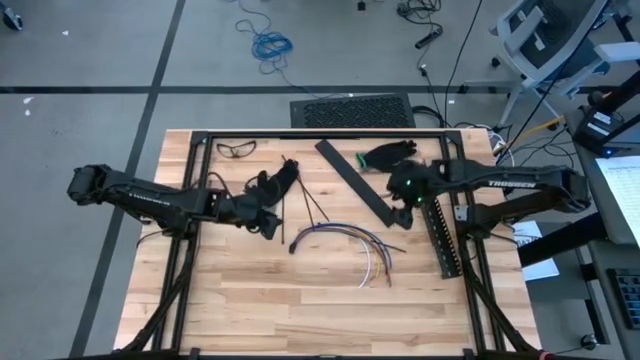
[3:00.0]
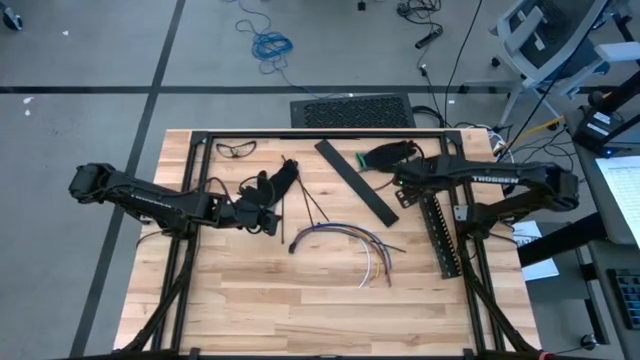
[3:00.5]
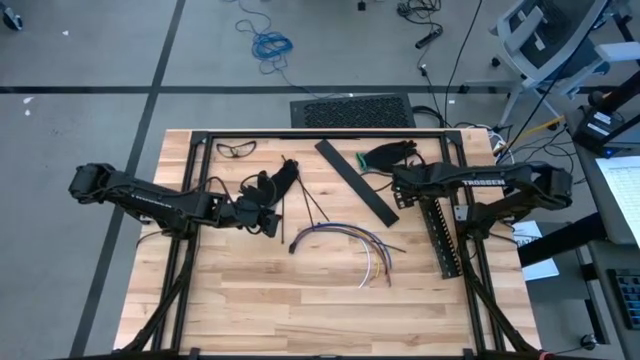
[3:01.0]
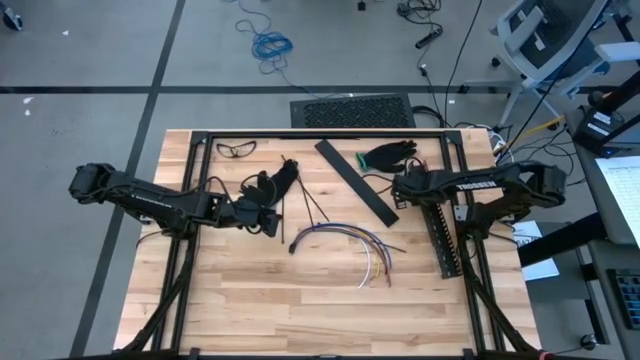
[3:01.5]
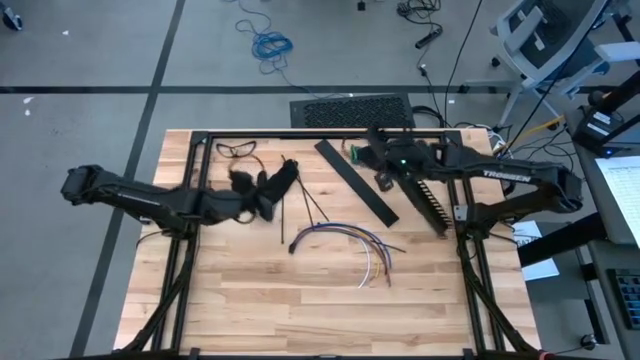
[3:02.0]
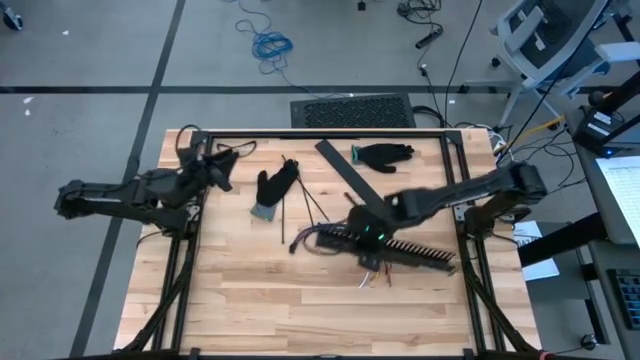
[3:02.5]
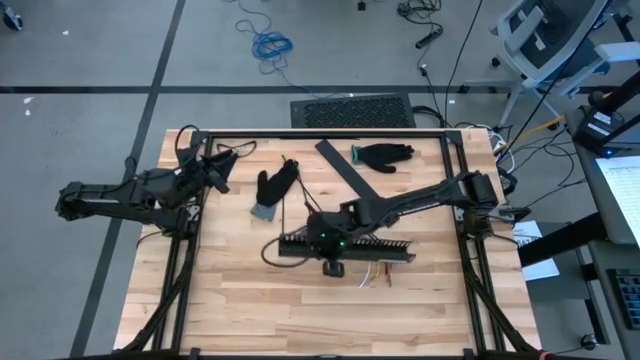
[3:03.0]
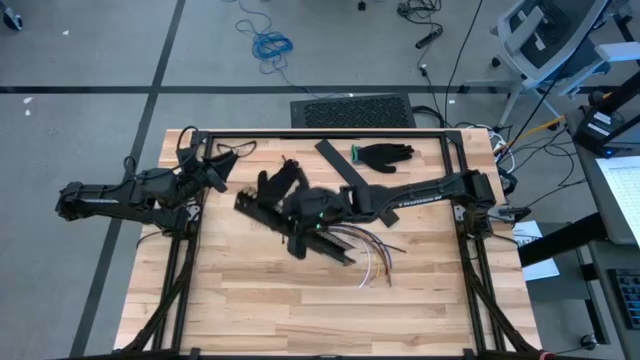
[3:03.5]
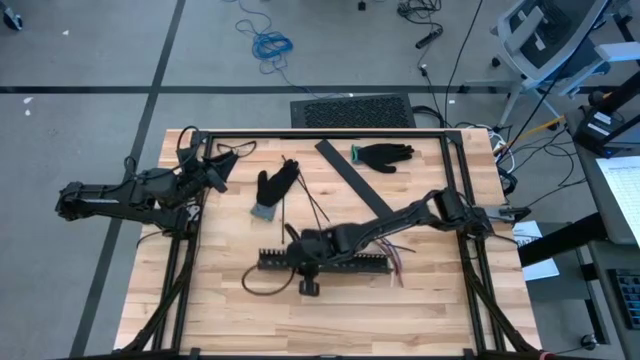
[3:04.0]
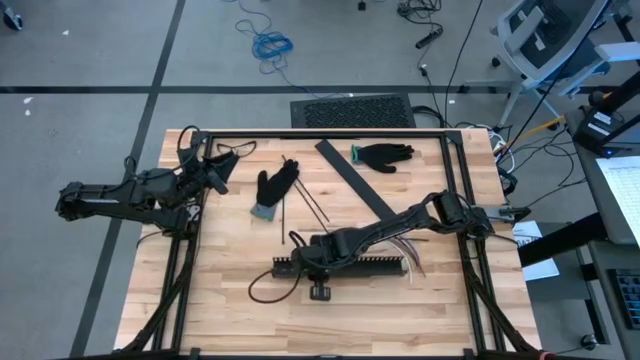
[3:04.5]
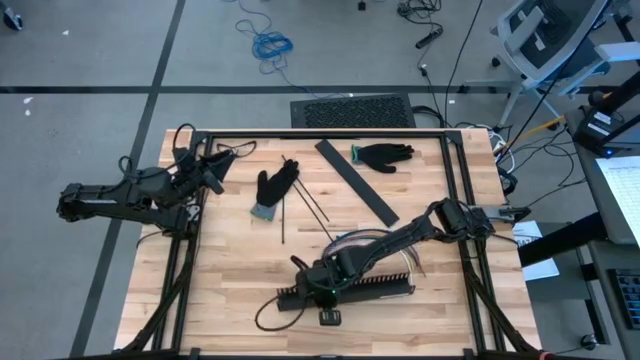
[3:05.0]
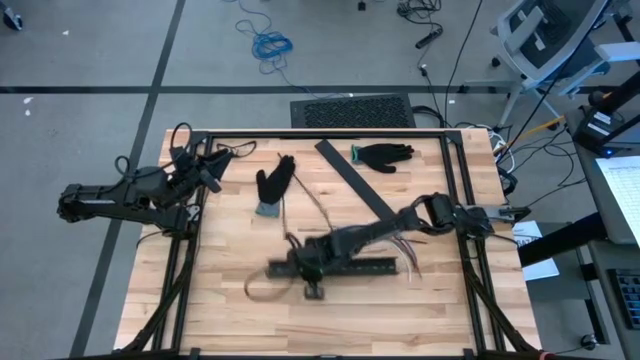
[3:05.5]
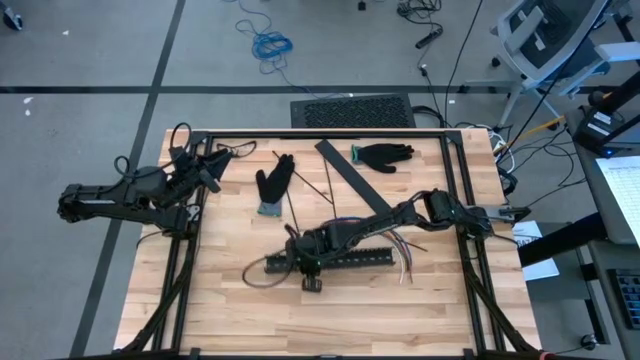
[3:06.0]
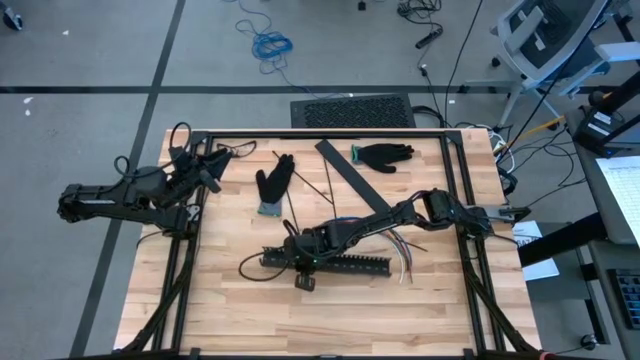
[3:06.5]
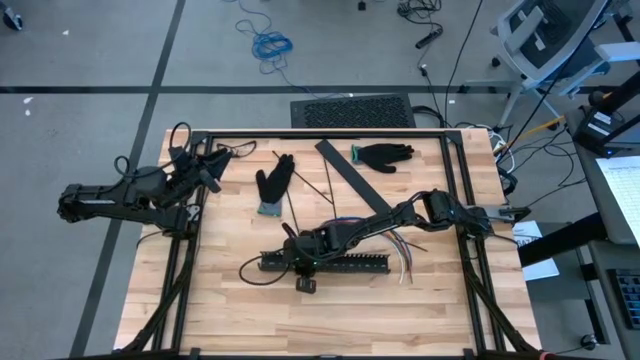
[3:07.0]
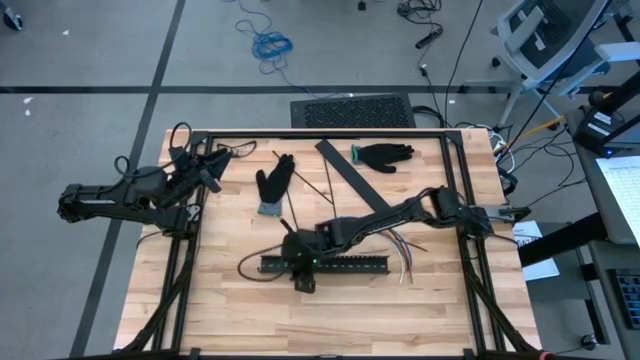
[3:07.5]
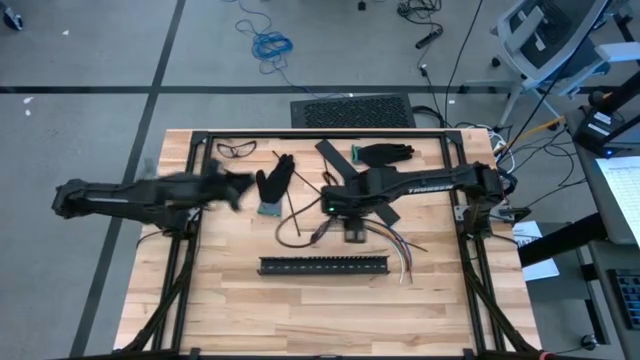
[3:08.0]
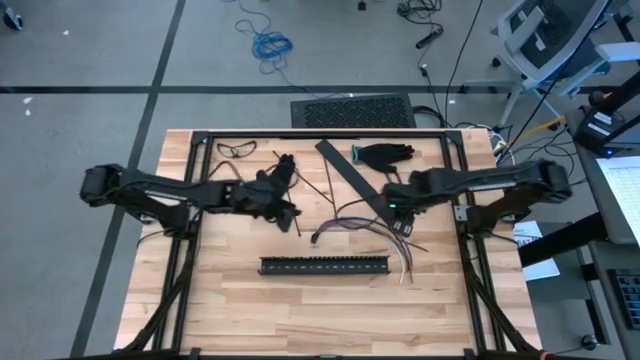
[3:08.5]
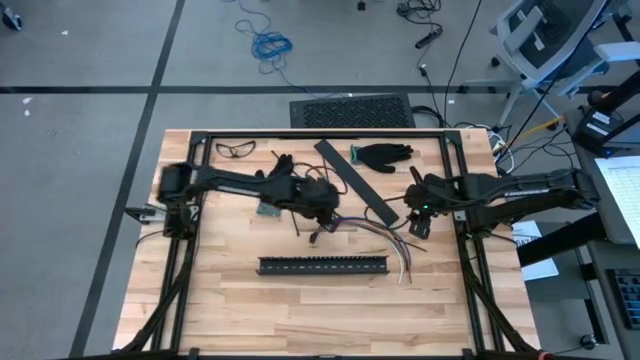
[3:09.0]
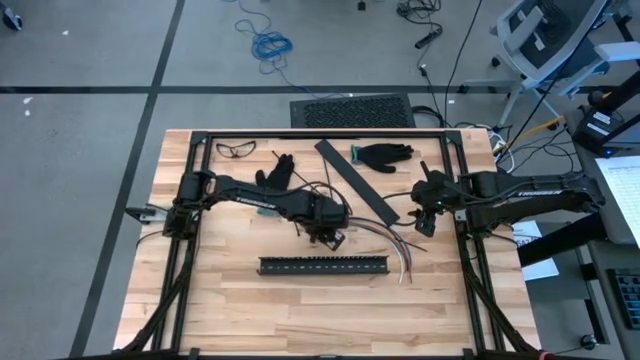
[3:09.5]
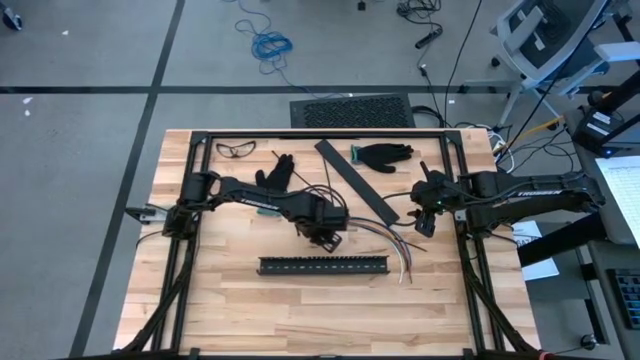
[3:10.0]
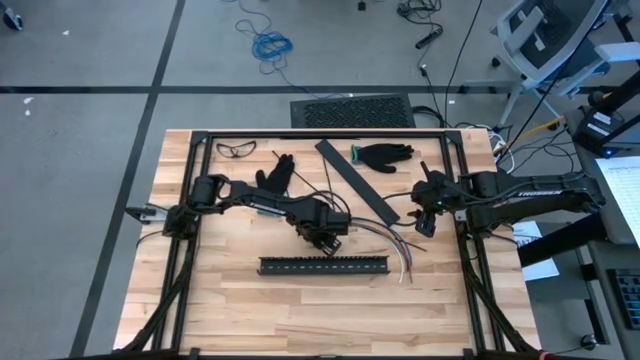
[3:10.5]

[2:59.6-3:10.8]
Task: Ziptie cables
Put the ziptied cables in the black cable duct

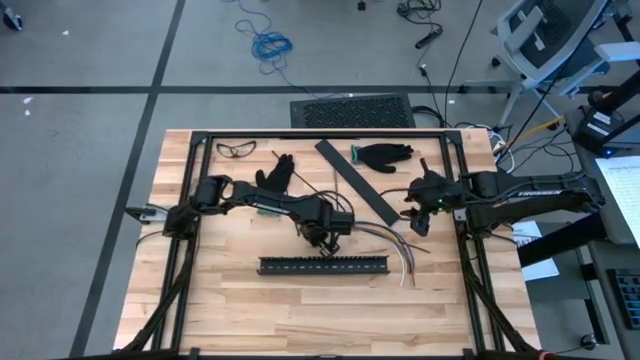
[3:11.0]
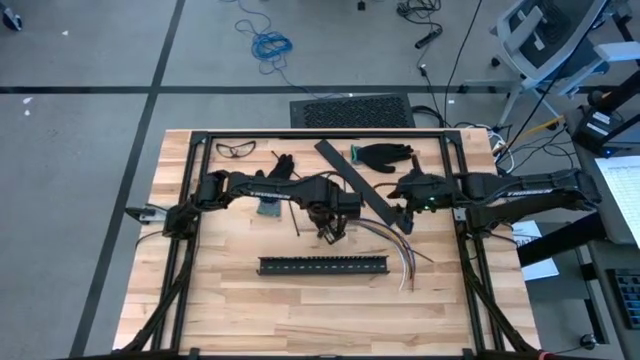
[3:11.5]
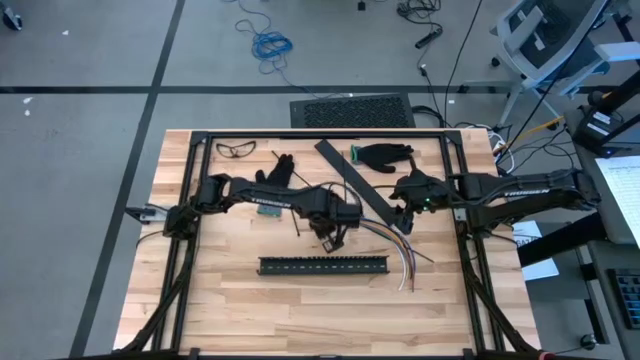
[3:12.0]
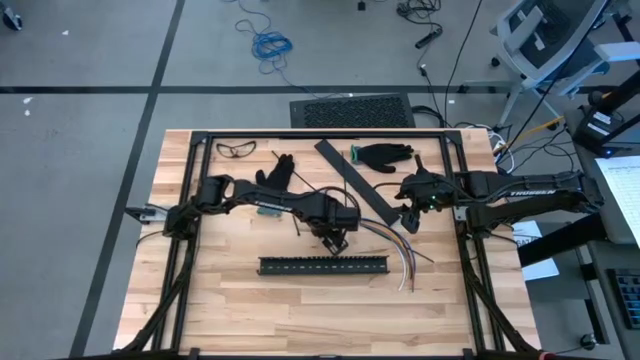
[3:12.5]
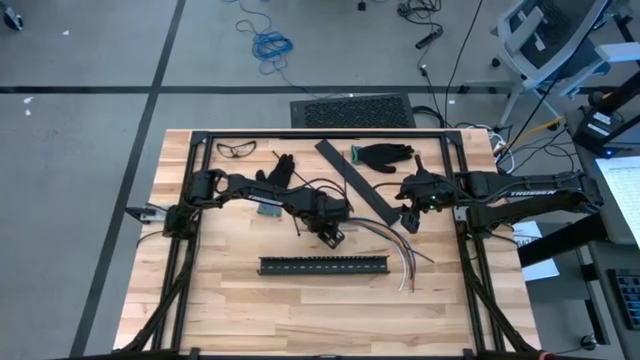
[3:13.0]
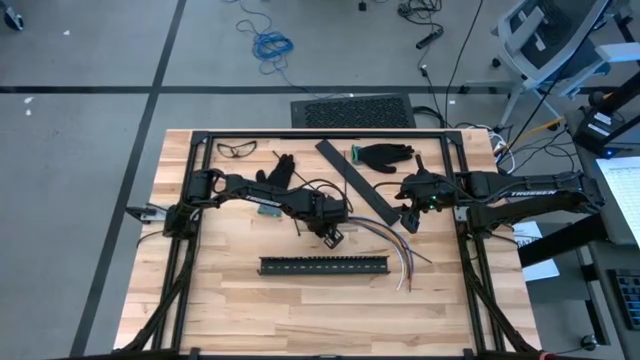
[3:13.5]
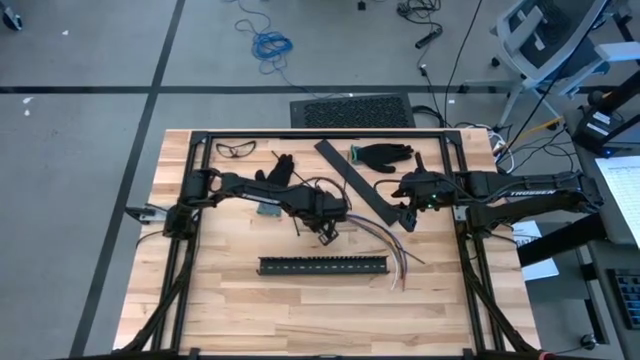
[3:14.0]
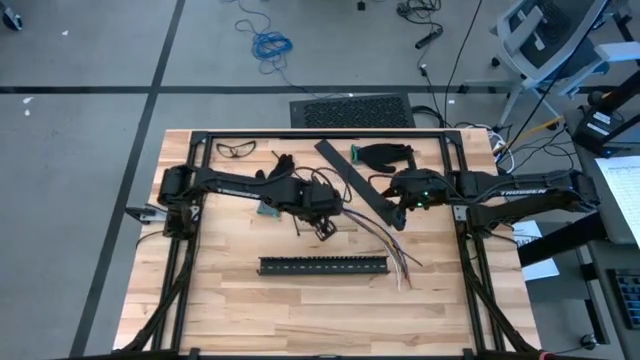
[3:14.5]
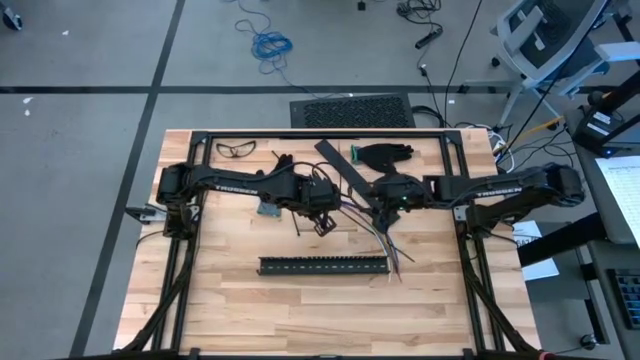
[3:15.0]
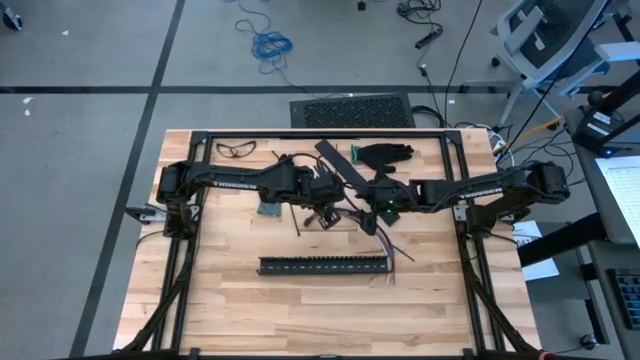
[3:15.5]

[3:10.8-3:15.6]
Put the ziptied cables in the black cable duct

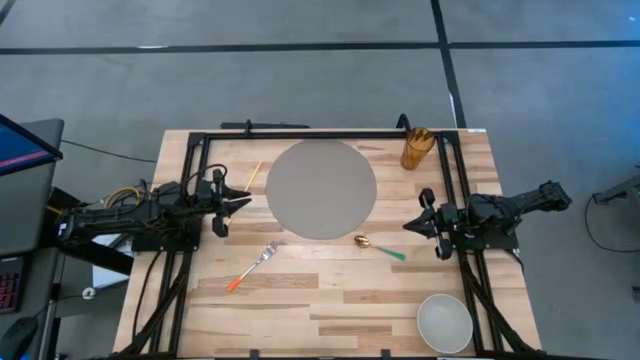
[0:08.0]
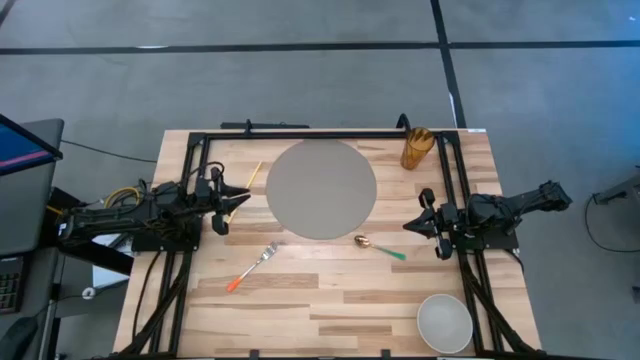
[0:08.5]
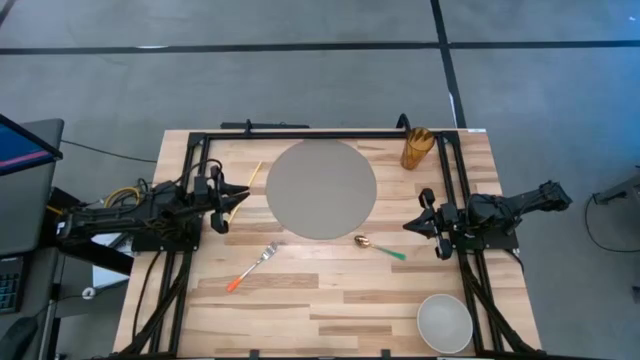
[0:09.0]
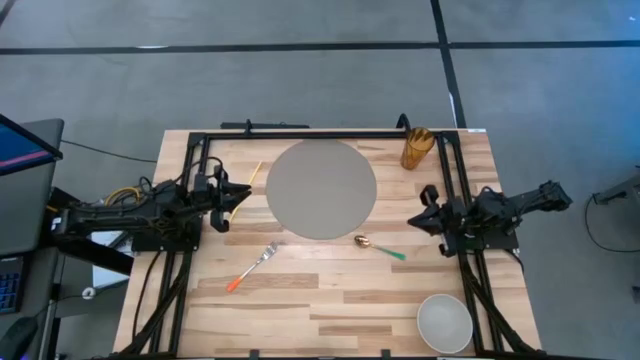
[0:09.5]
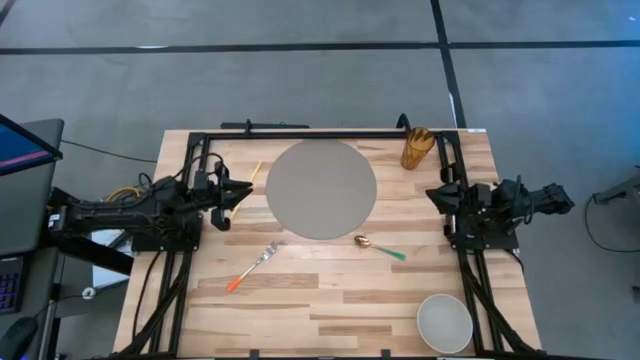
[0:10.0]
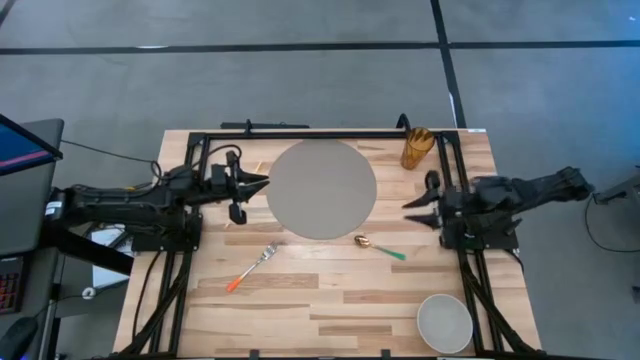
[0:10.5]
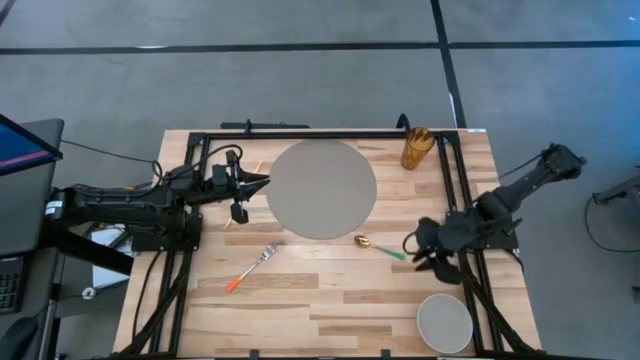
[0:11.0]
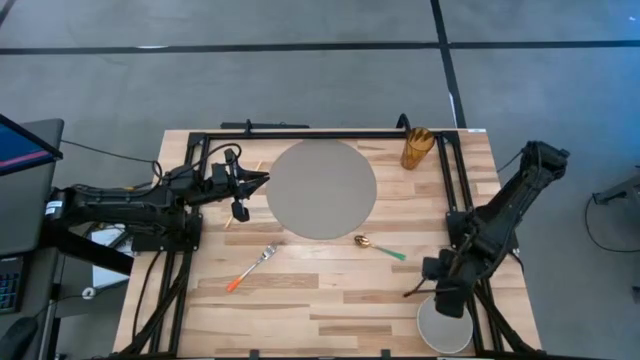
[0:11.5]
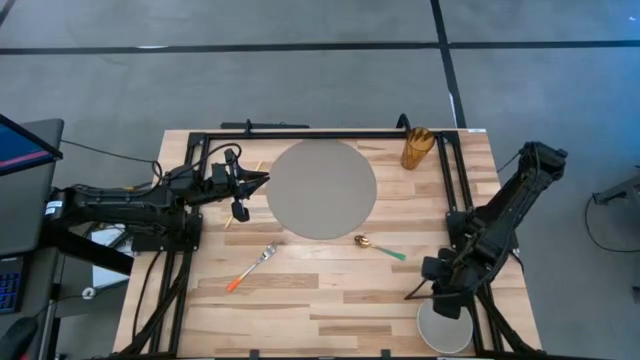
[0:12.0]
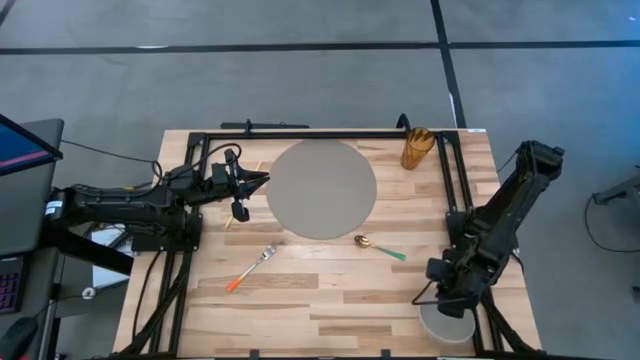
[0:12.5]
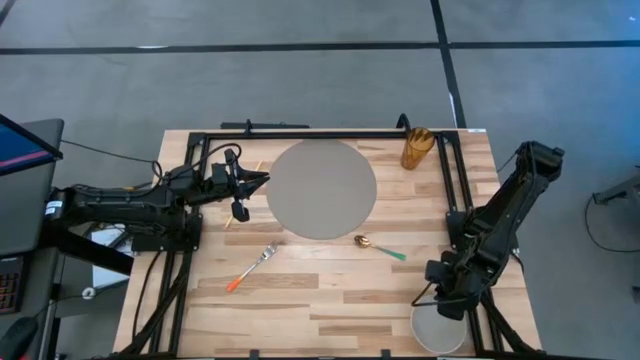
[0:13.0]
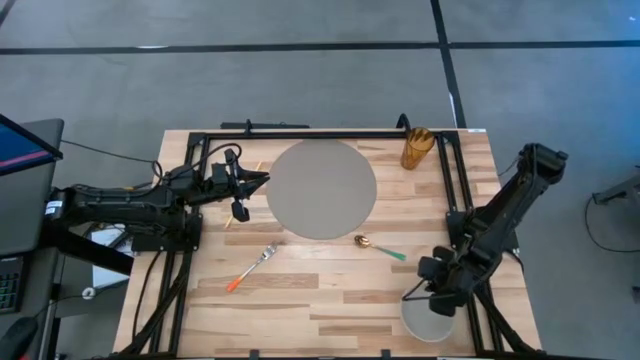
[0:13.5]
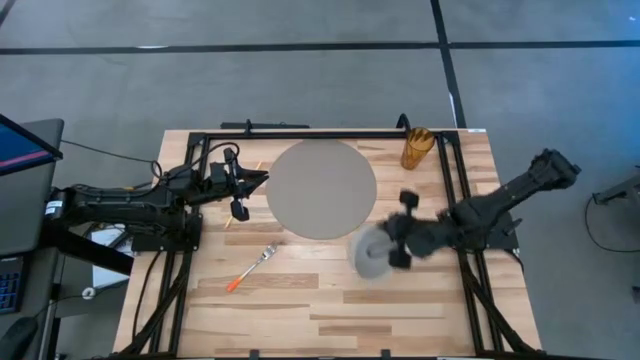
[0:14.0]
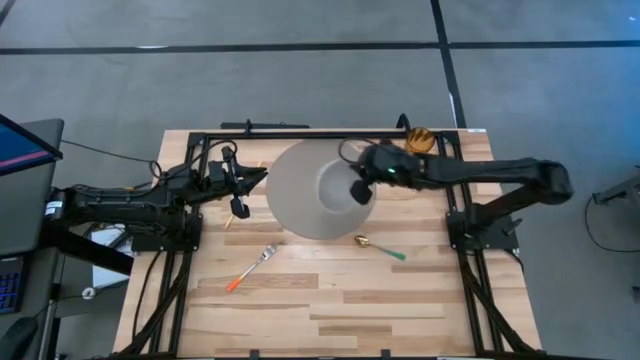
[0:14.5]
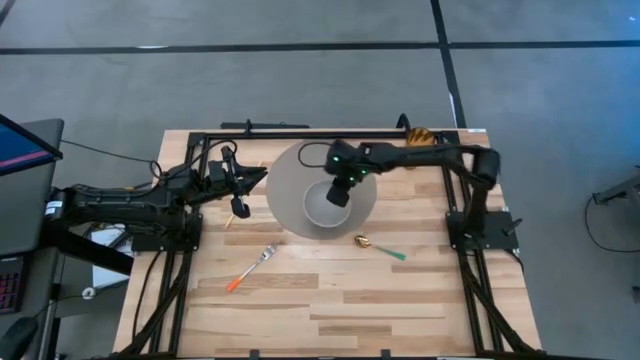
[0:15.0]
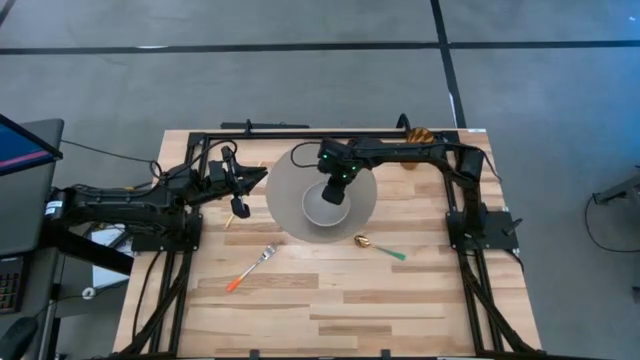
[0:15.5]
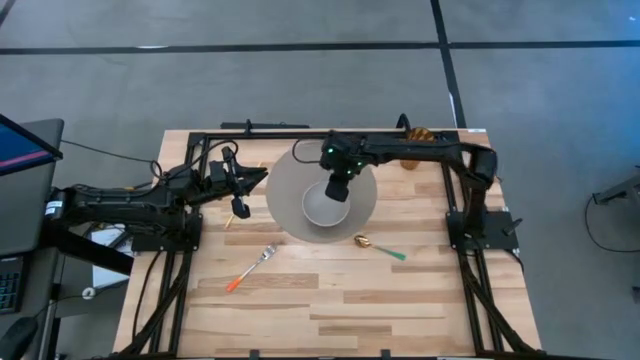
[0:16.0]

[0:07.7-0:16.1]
Task: Pick & Place Utensil
Put the white bowl on the center of the gray placemat
